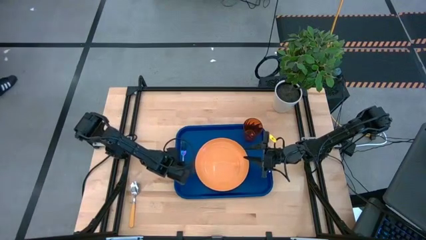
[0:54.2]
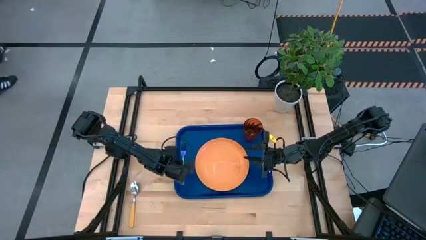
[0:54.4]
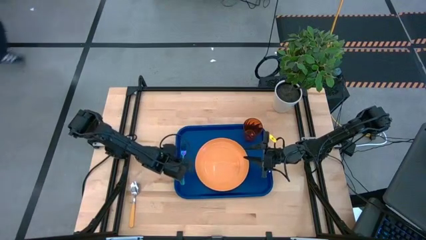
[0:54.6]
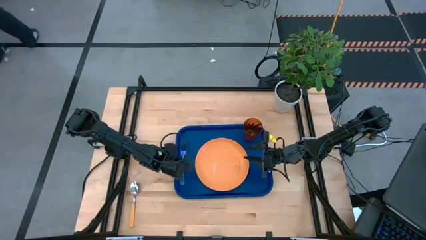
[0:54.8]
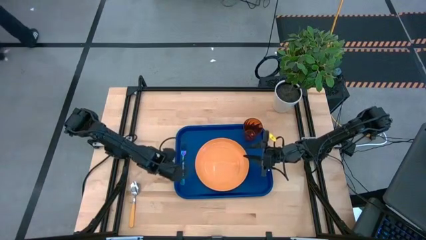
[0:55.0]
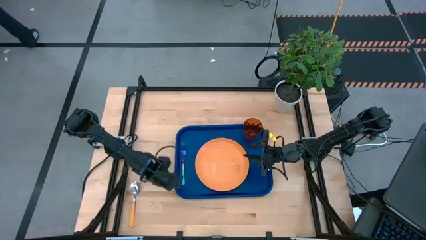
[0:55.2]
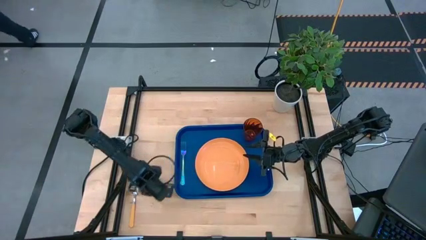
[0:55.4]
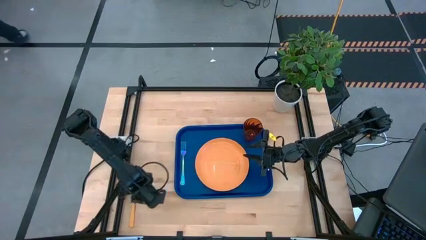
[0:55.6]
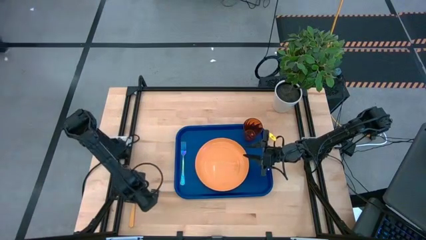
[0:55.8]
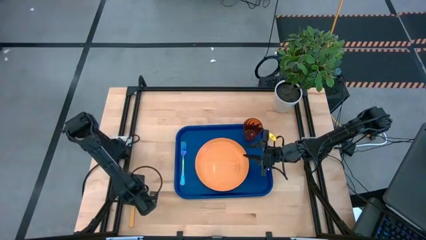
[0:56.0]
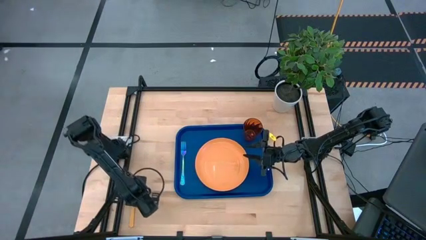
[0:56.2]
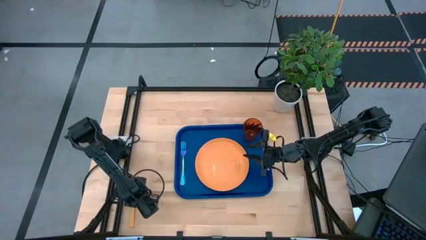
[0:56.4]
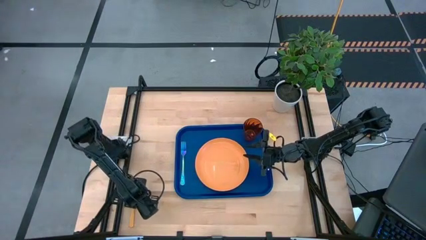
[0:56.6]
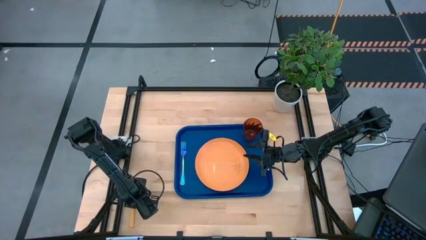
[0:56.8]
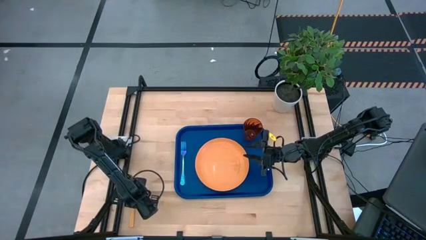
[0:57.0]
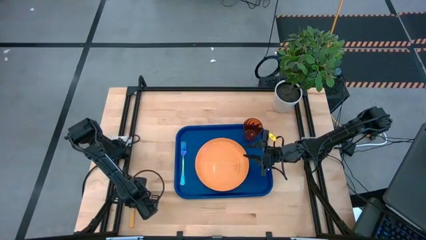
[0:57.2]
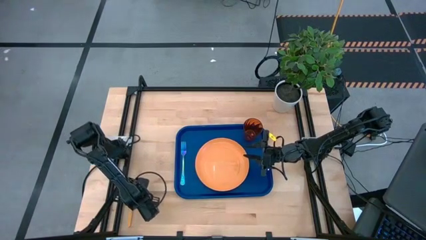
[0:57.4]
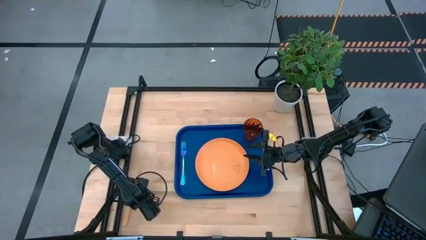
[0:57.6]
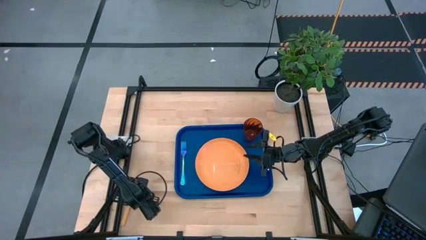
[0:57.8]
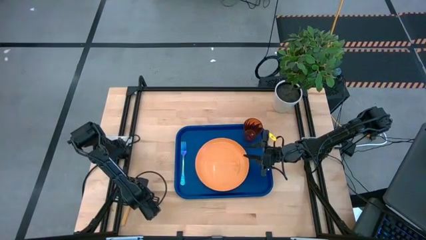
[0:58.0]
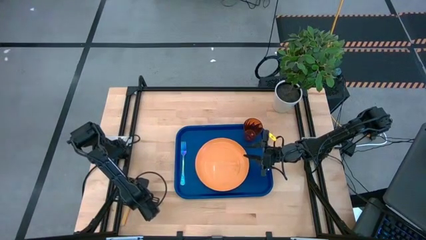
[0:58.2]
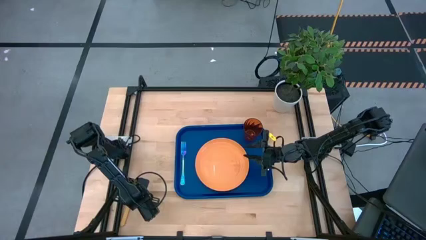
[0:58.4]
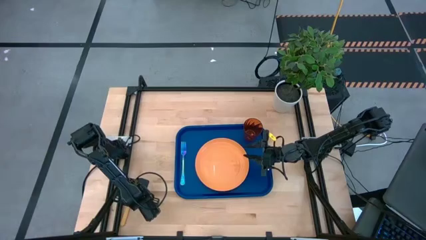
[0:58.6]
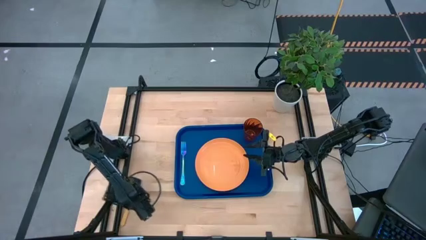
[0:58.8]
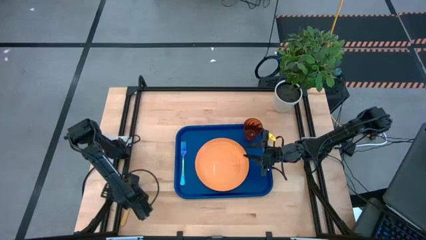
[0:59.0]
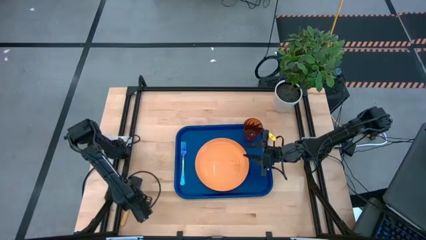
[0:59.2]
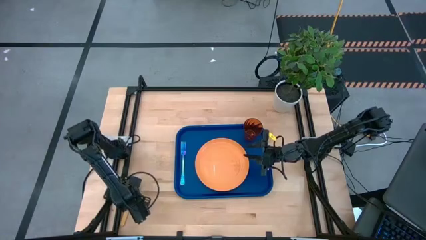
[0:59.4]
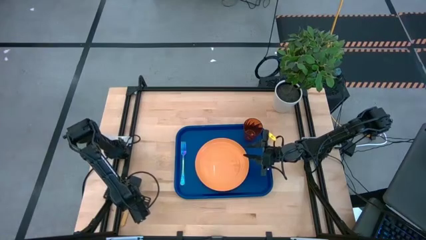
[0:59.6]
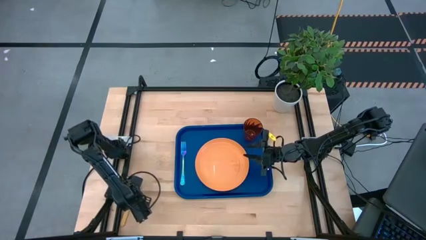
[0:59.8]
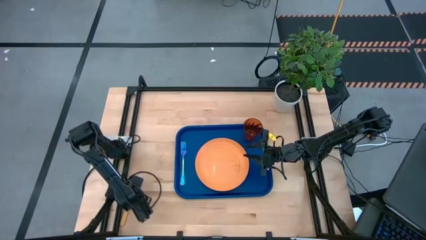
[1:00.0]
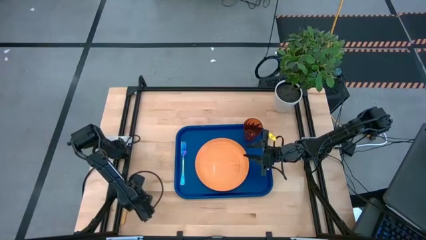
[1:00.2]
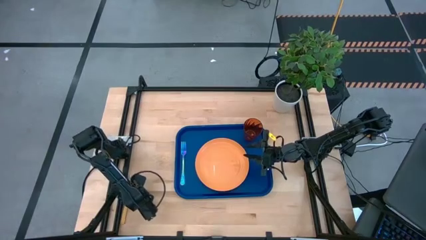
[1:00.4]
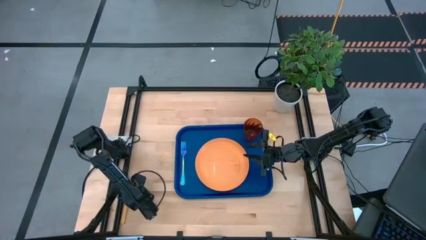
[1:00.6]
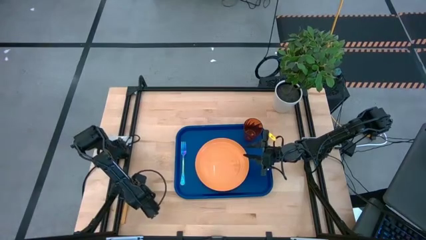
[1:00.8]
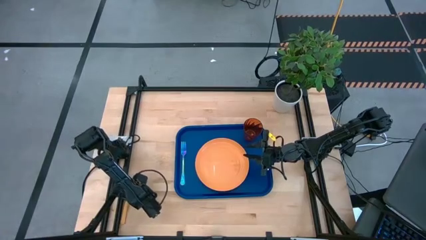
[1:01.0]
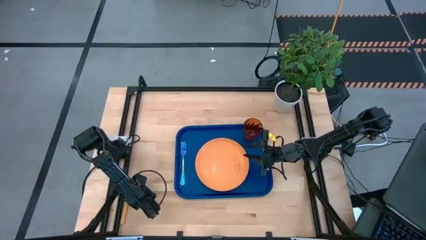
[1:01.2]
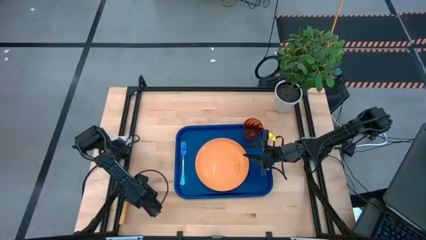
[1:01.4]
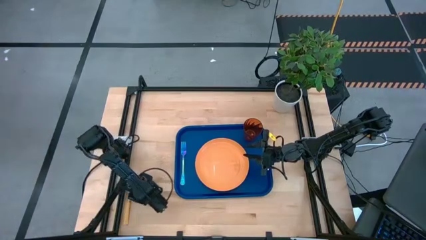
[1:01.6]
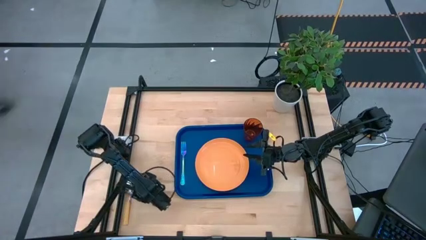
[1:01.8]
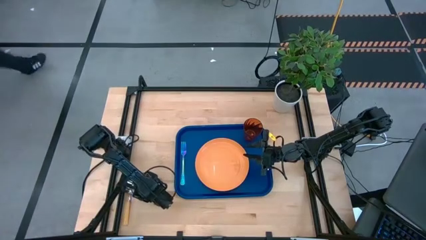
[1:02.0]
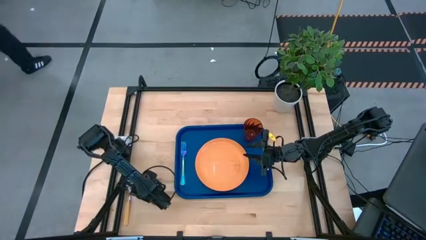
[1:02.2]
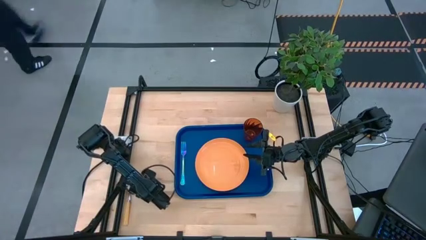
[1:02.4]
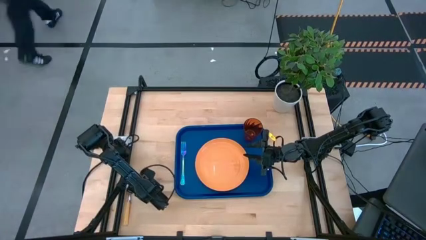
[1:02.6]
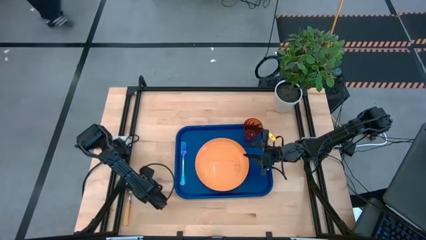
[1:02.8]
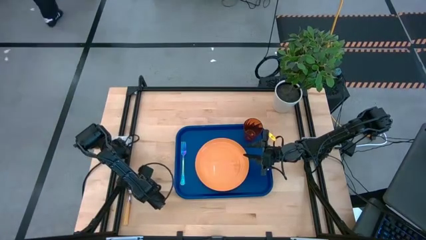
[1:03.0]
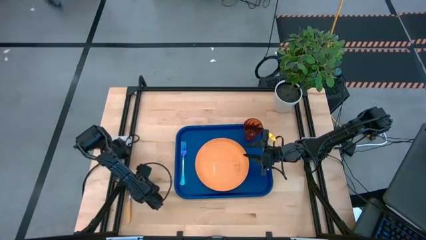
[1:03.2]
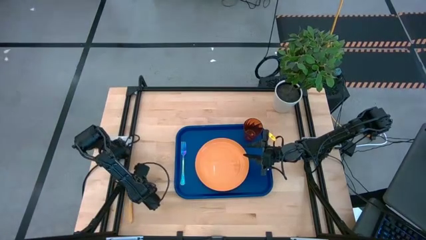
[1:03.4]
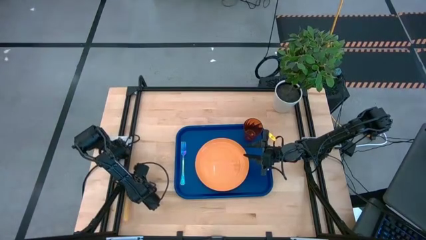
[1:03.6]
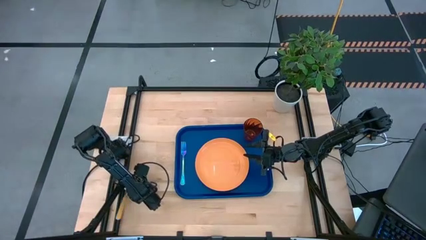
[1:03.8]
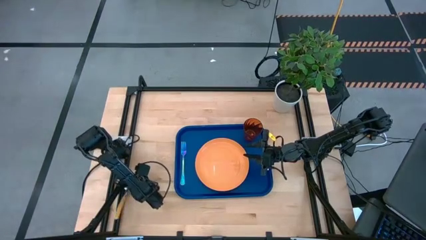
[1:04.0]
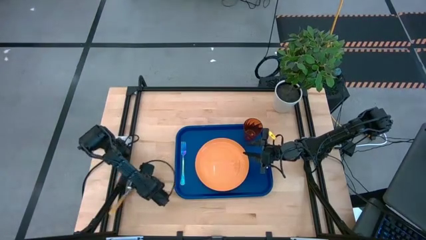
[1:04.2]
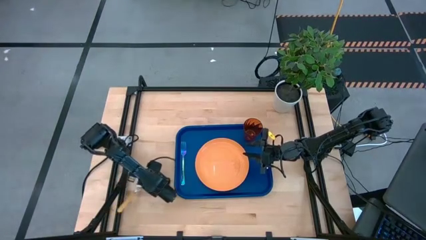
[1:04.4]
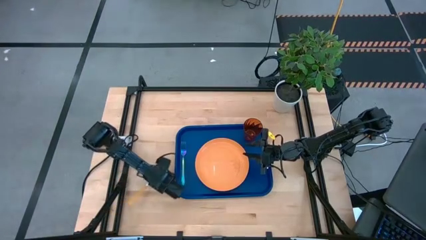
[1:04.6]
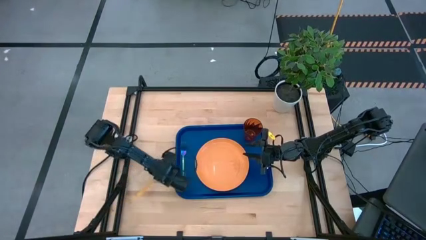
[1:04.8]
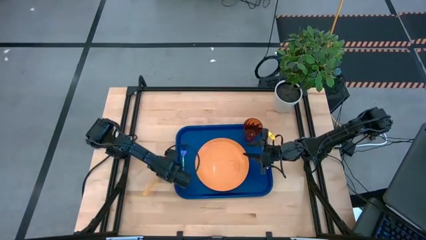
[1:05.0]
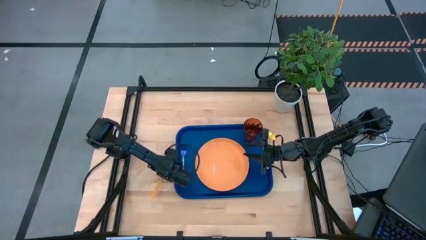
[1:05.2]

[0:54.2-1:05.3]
Task: Pick and place plate/cup/fork/spoon on tray
Put the orange fork to the right of the blue fork on the blue tray

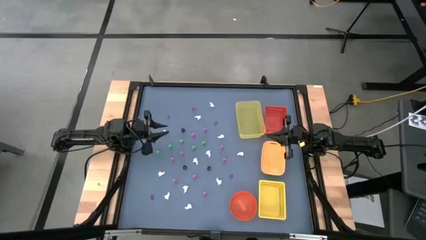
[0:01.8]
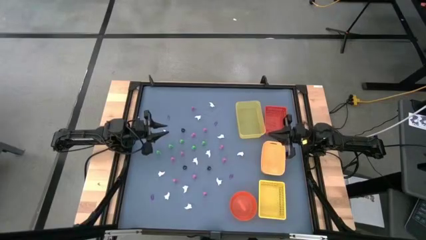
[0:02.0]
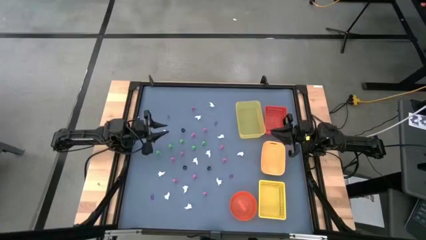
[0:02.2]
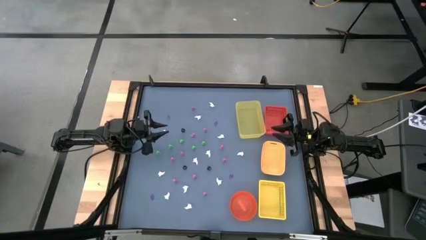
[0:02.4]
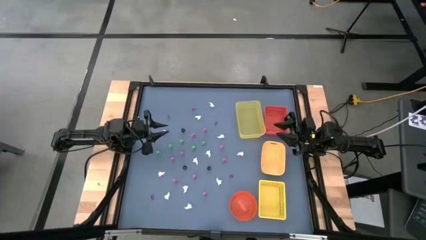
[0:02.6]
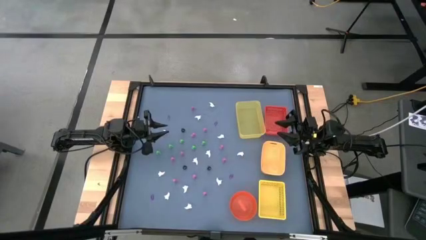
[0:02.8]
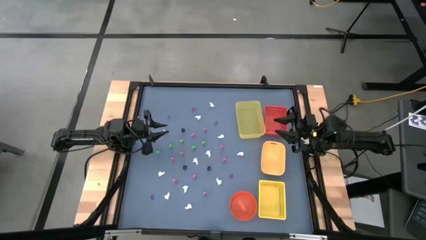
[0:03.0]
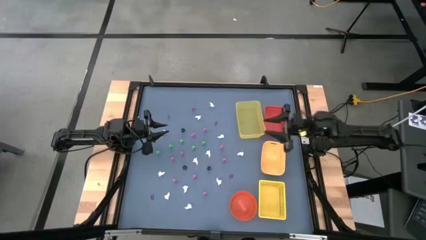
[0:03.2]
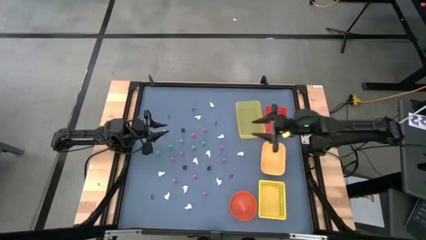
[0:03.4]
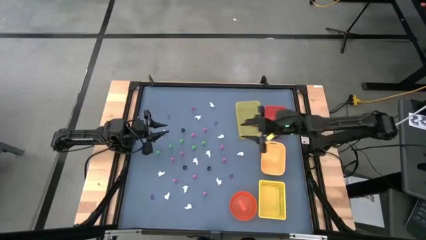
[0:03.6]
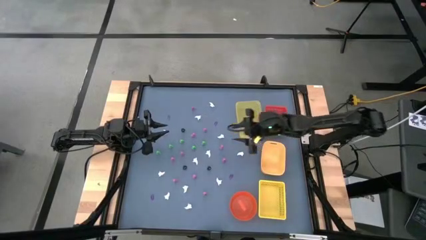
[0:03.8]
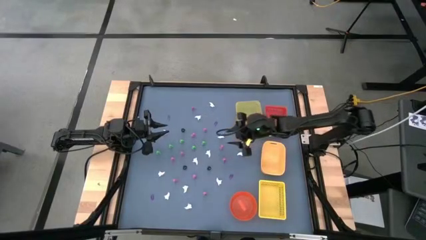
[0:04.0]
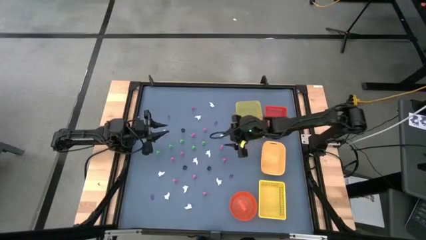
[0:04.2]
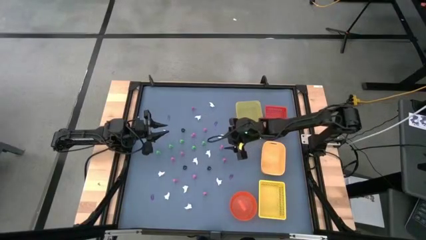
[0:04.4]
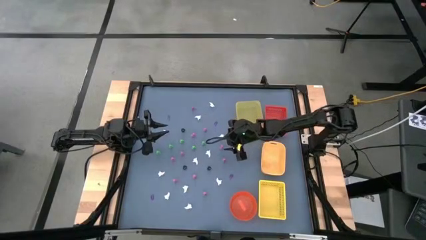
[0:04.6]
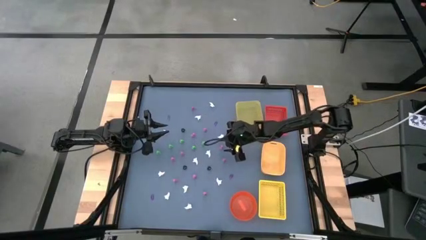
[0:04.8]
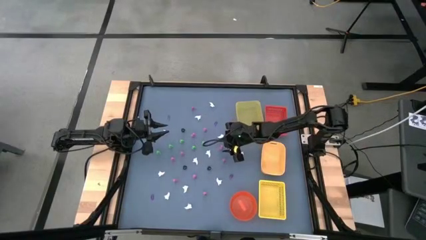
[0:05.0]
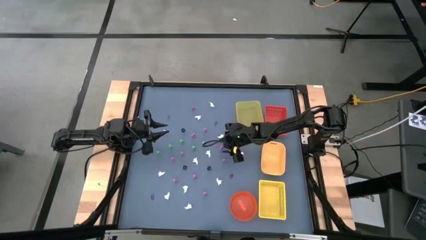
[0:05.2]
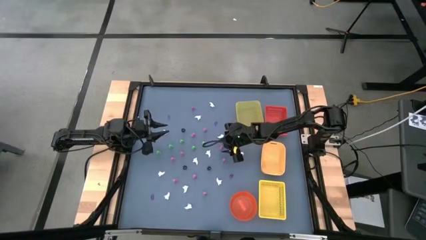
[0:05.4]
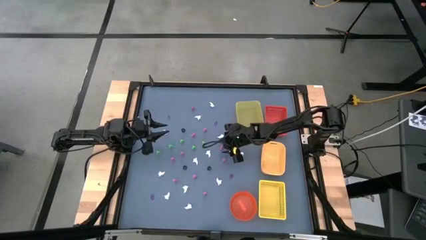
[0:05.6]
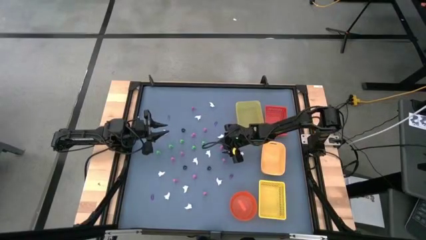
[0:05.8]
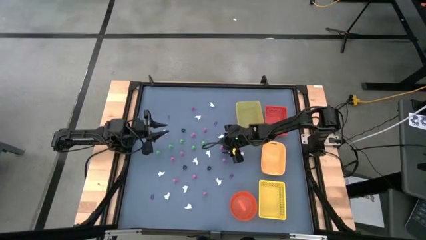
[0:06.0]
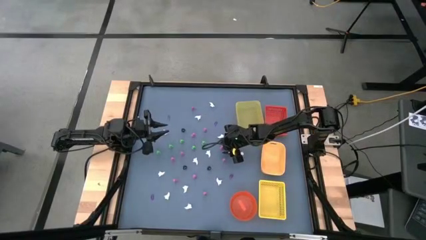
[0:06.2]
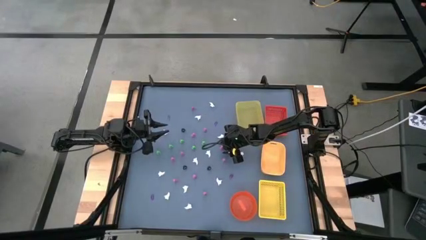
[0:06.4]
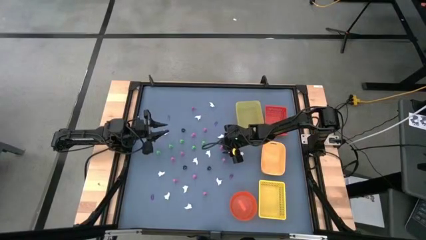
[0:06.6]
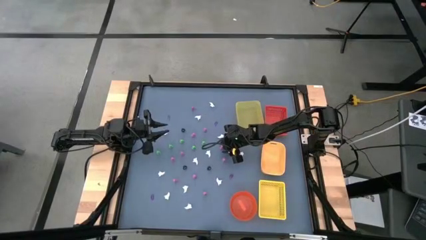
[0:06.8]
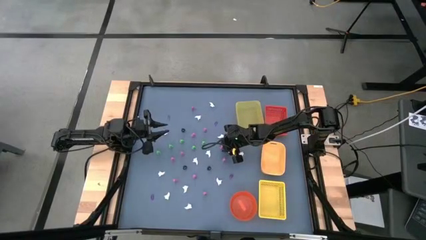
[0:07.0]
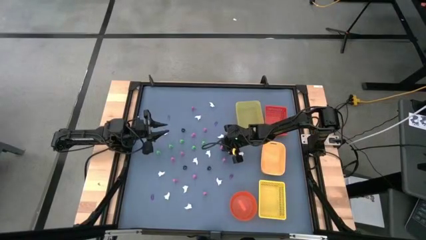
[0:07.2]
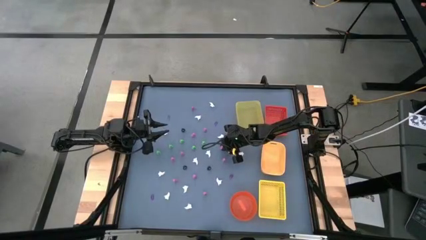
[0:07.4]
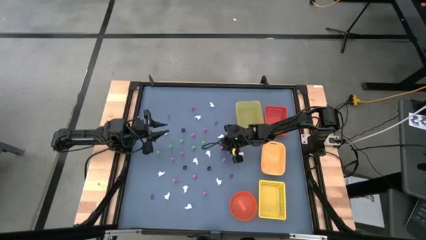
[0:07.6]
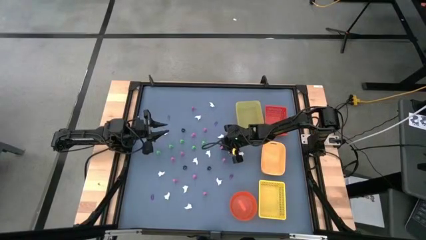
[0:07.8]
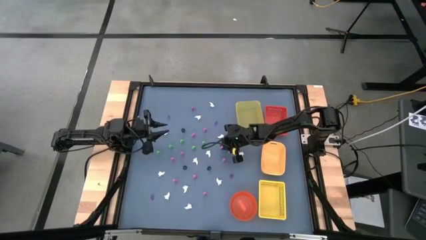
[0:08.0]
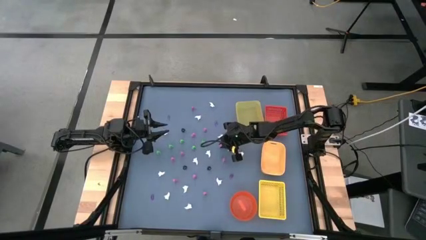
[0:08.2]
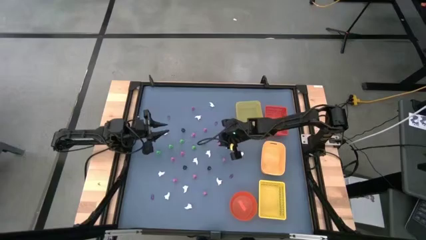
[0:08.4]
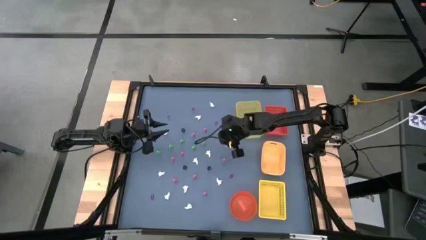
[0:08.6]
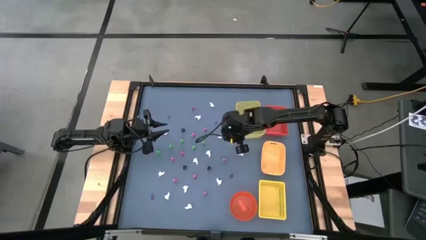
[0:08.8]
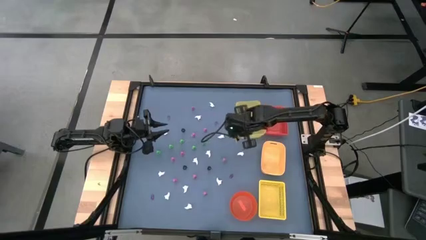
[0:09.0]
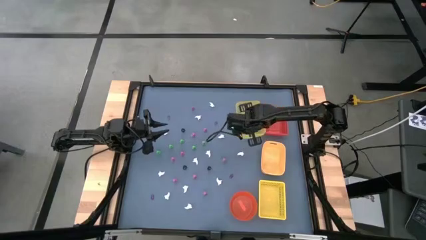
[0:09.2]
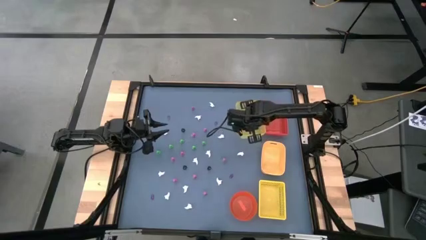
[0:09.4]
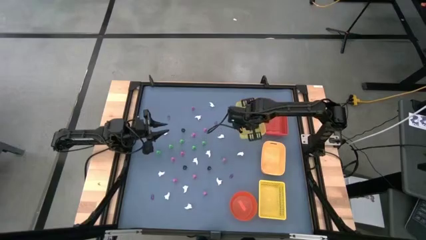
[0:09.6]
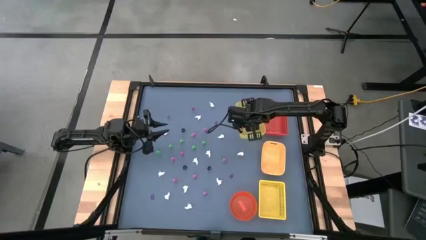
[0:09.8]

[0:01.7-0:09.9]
Task: Sort Halloween decoration
Put the pink skeleton toy into the top yellow bin
